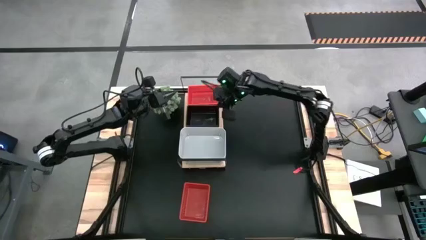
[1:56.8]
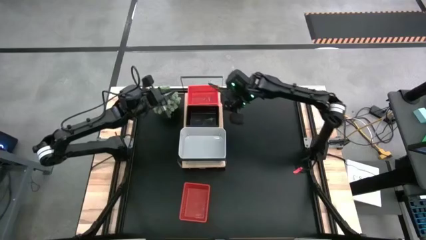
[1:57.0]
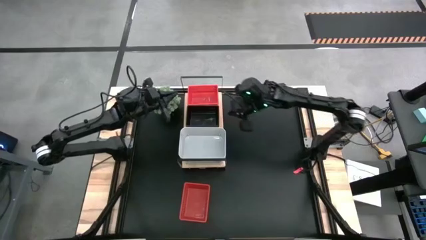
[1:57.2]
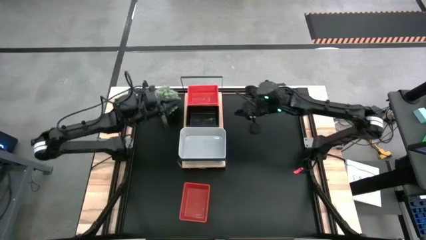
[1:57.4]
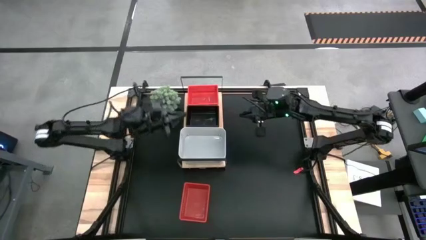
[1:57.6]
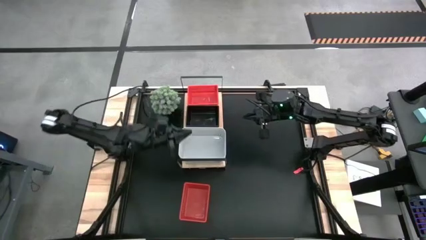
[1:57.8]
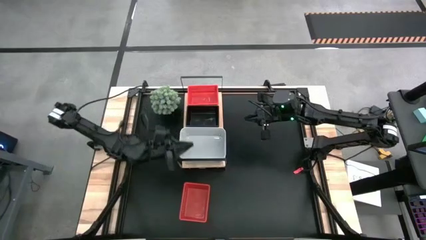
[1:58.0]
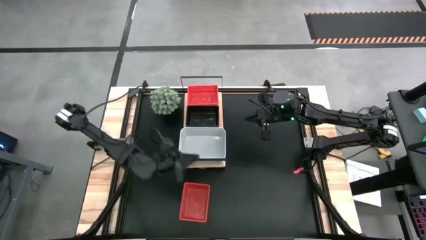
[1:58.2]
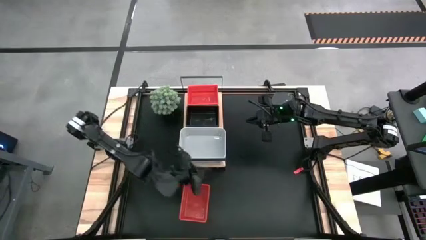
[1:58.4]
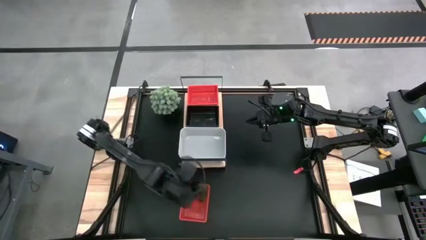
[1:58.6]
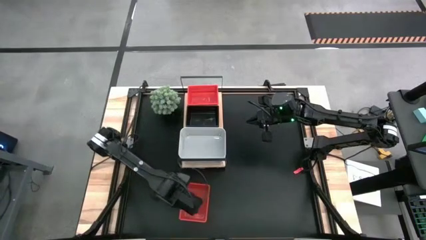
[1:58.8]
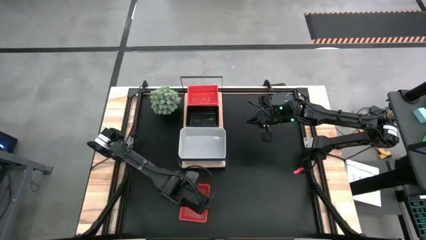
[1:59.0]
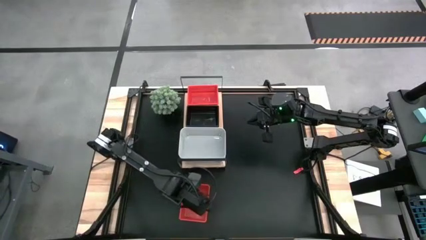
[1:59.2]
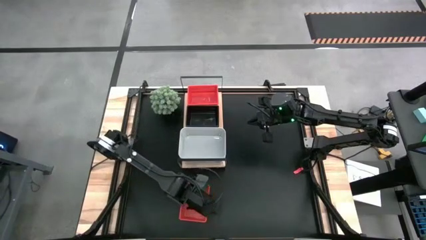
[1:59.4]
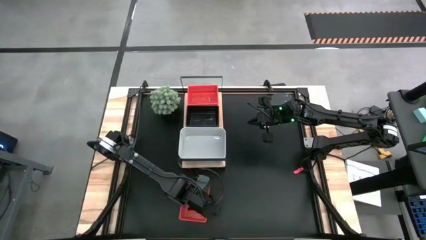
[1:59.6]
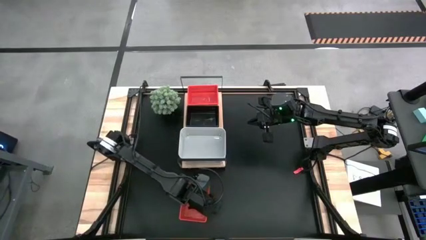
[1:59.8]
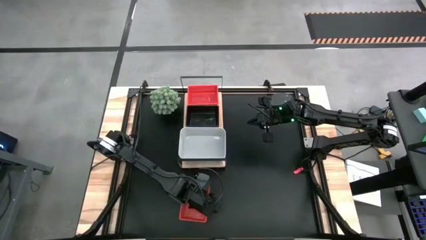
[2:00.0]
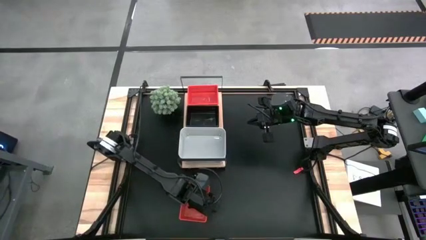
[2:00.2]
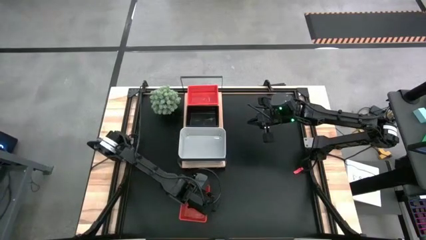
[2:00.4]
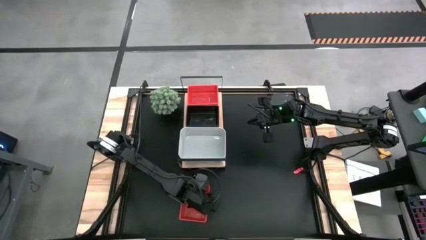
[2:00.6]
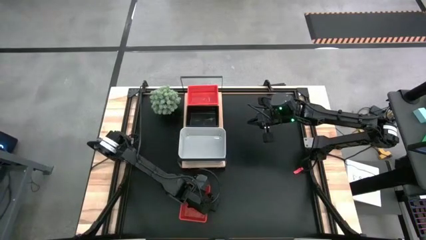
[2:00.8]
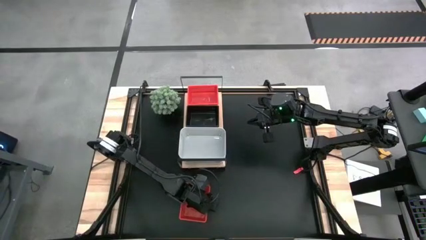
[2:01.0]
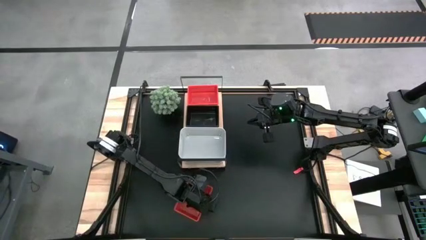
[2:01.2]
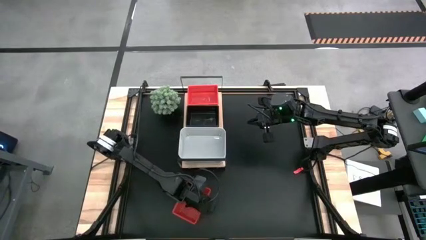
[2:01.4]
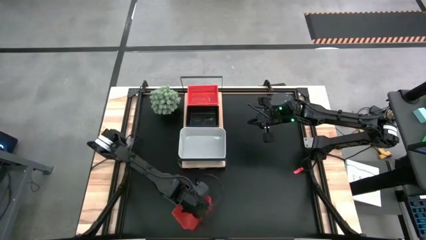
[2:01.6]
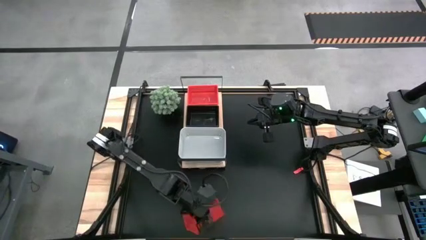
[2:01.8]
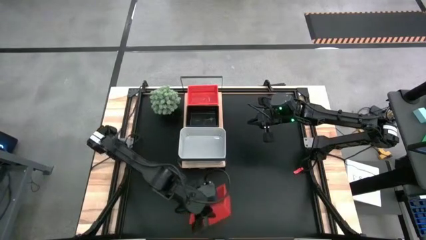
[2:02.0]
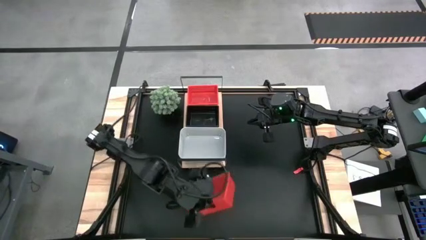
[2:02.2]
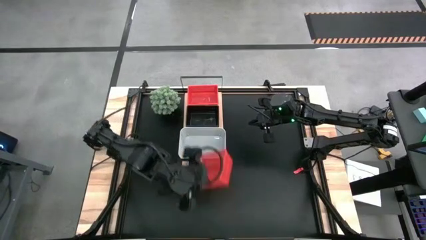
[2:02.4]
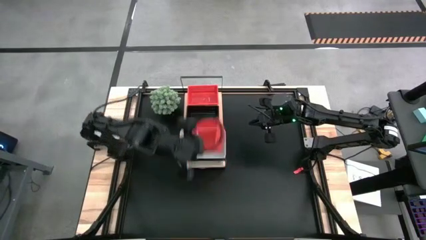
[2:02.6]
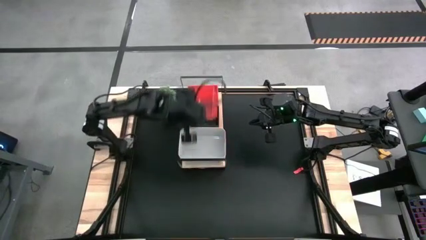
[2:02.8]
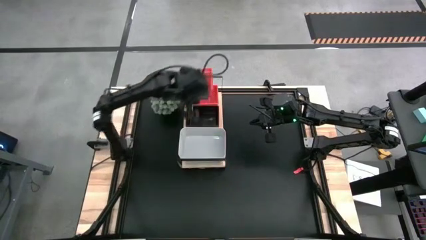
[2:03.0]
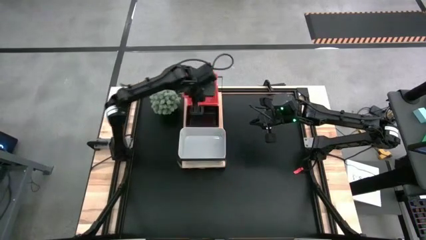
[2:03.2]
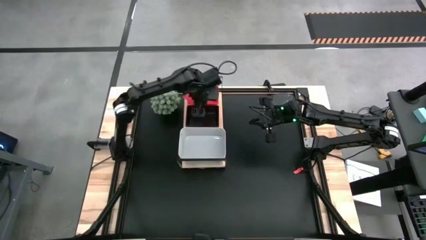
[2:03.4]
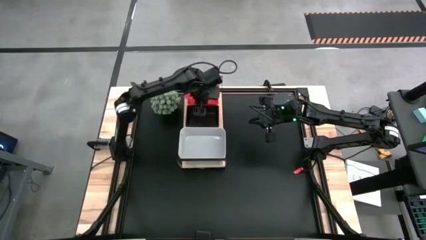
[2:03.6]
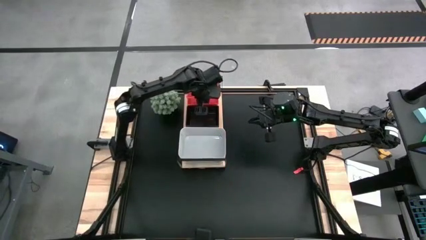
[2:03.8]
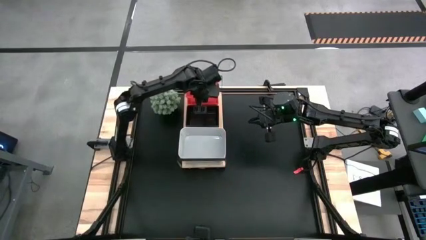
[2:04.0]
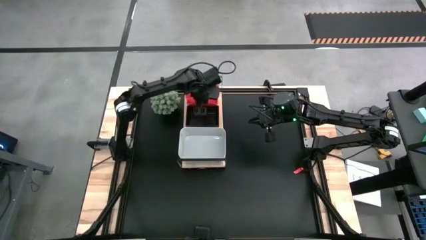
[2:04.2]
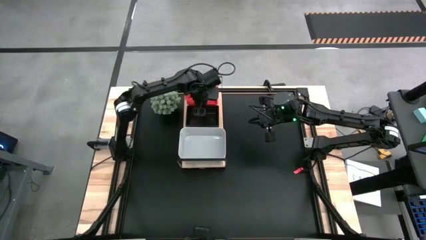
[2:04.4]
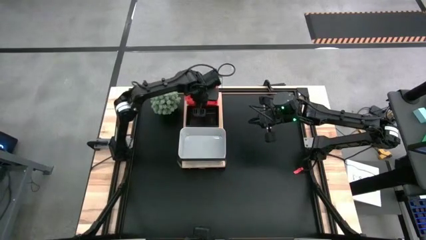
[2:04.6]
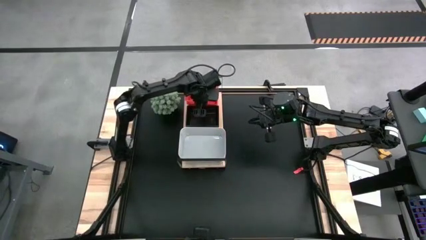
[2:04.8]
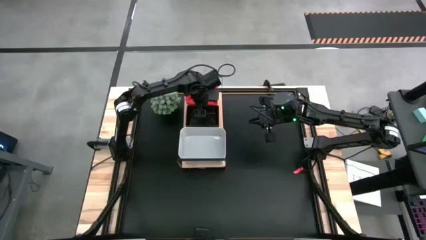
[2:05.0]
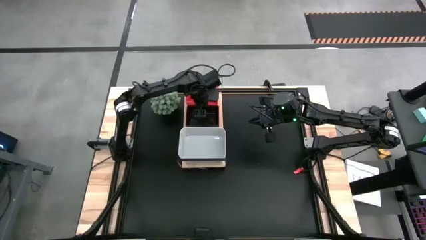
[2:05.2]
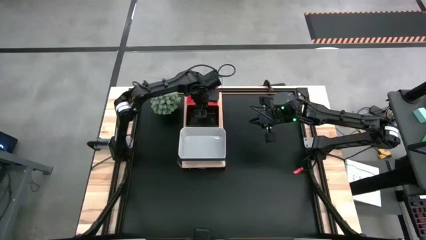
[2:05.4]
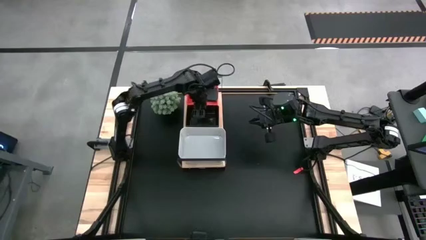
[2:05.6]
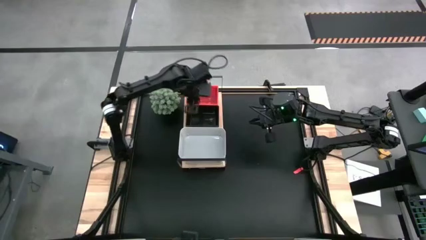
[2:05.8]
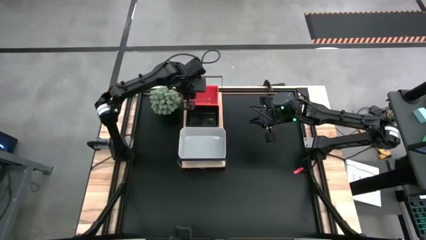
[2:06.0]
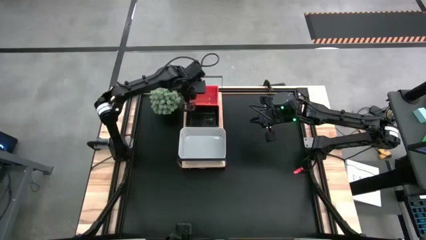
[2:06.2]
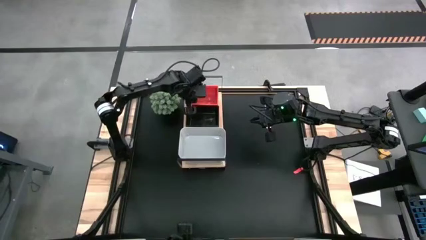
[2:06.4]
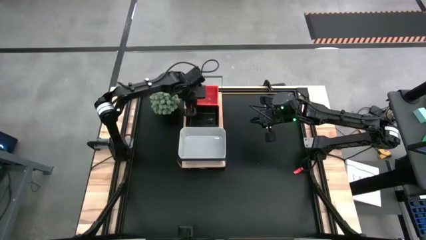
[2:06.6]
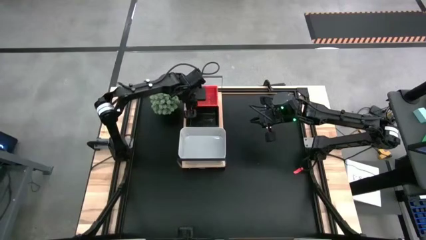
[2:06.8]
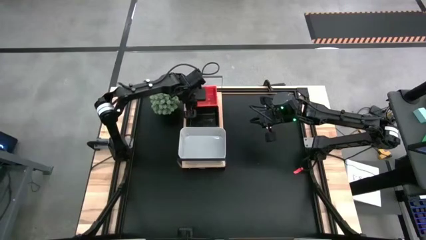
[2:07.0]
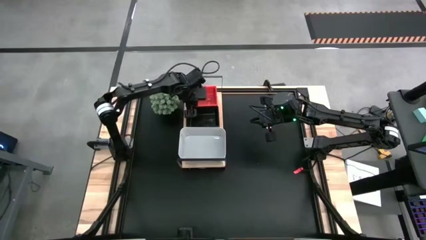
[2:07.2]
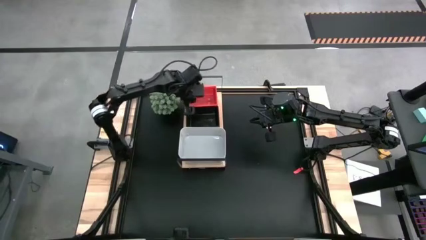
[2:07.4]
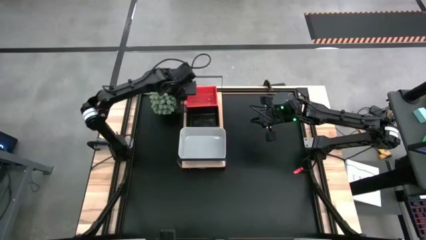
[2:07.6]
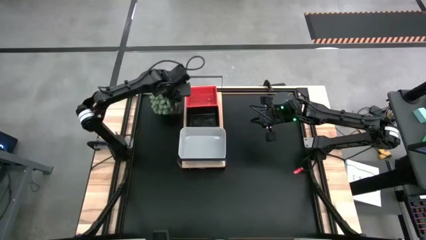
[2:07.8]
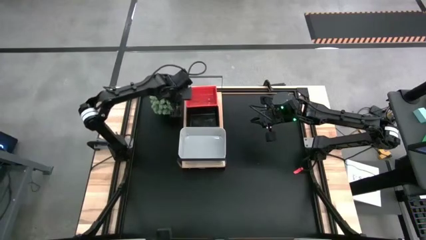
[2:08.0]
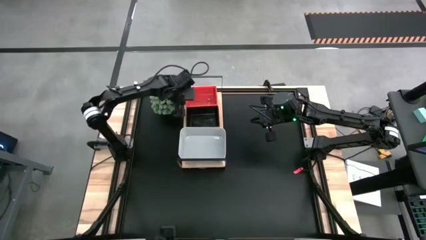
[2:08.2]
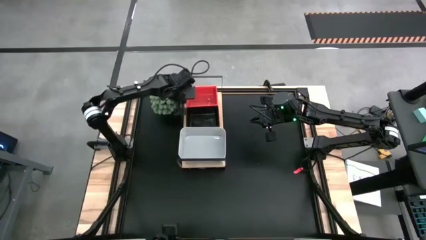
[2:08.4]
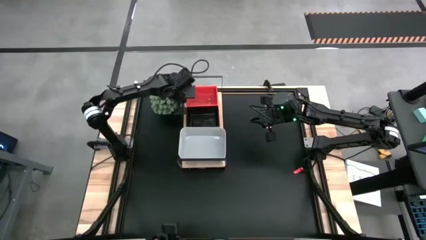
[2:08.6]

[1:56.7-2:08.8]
Task: Stack baskets on shelf by color
Stack the red bin on top of the red bin on the shelf

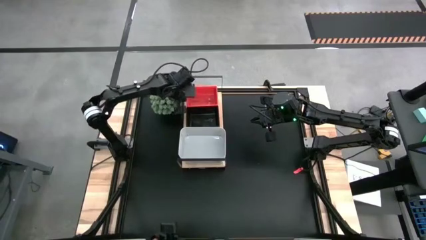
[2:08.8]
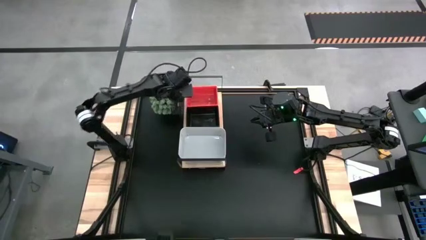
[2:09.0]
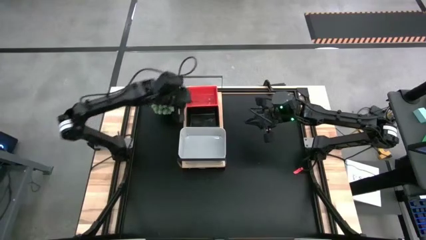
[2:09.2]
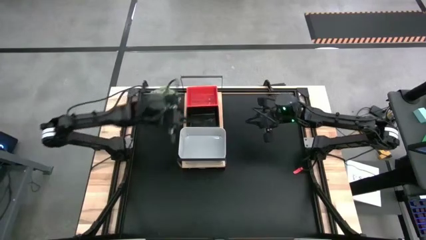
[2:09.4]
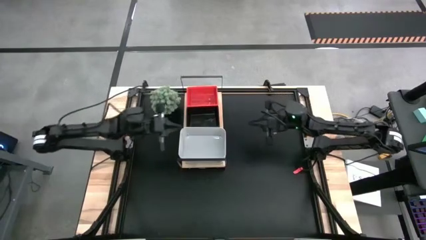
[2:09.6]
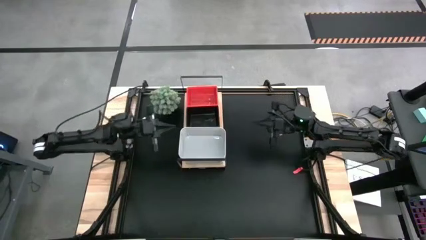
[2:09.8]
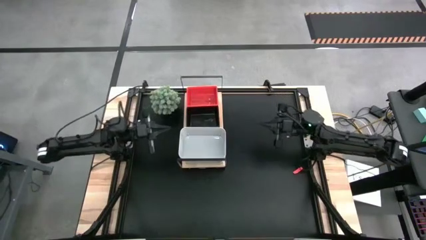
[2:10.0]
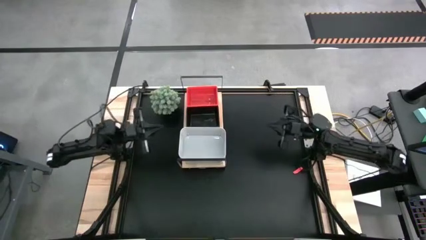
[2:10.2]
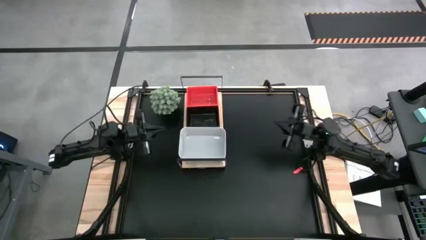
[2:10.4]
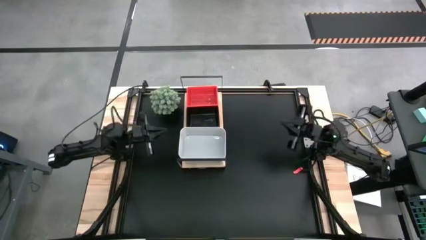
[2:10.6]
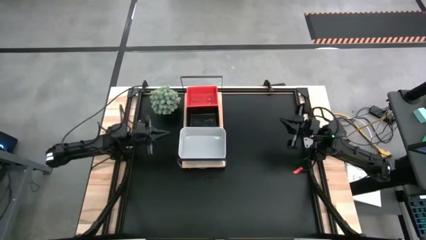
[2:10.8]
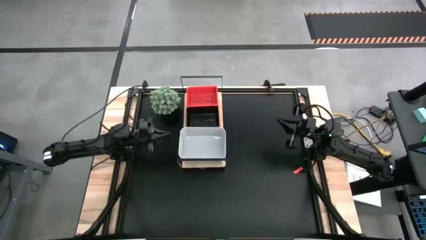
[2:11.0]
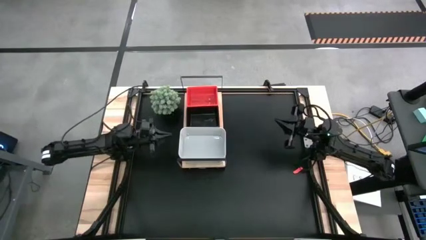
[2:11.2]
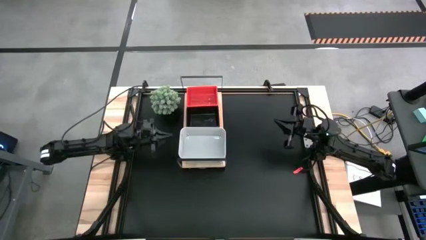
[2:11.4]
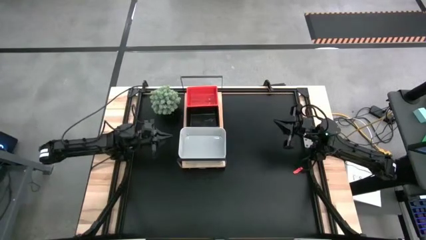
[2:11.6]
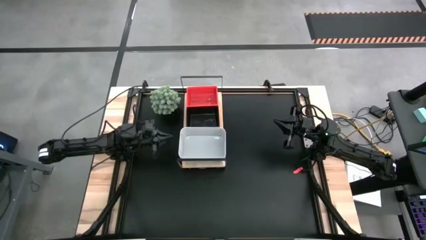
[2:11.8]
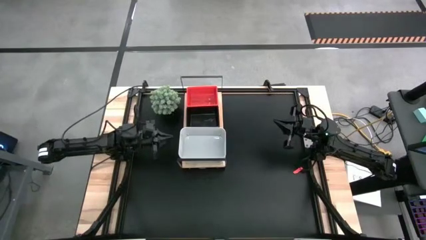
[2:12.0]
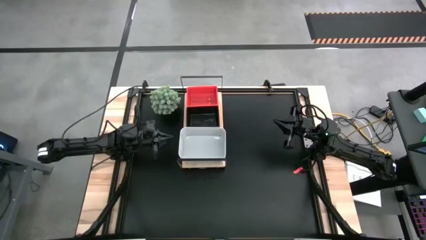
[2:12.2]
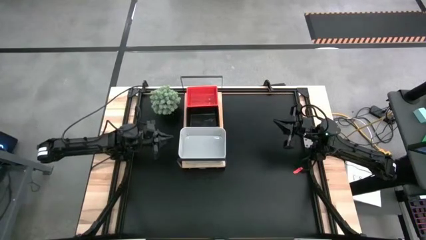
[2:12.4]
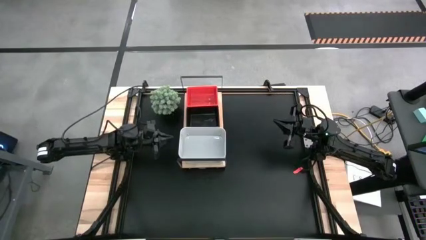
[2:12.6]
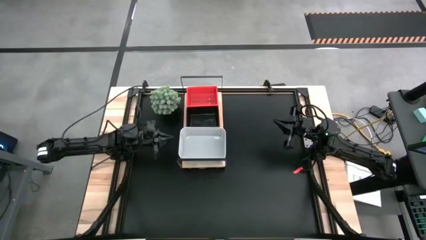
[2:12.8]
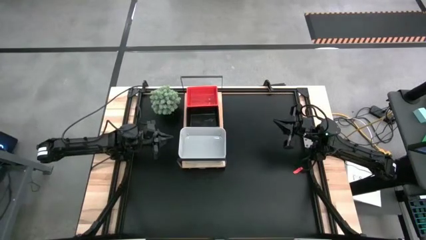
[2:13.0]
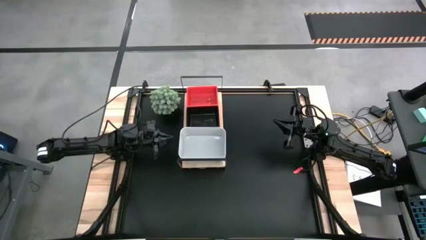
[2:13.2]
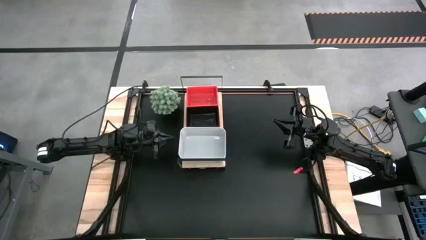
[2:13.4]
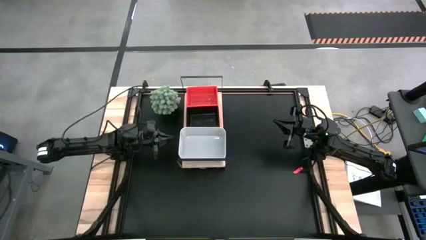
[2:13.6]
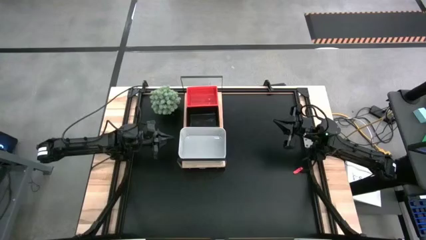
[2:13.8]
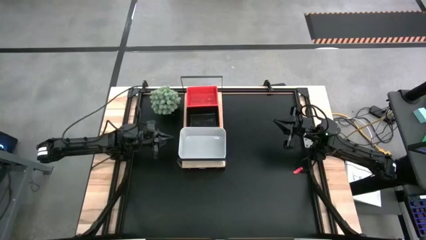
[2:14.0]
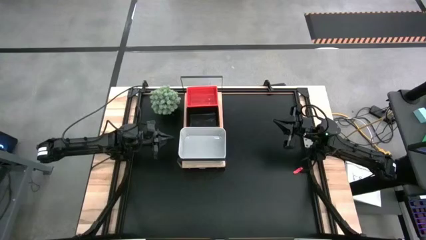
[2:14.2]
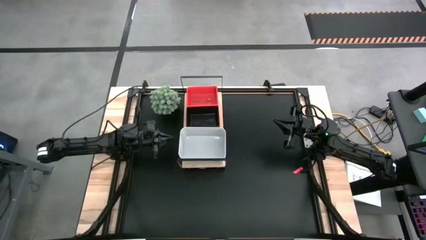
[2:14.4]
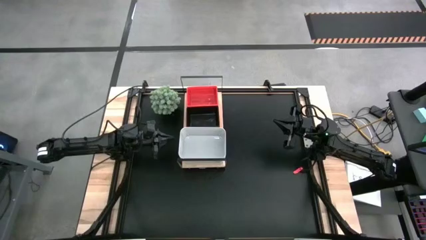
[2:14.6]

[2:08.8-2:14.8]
Return to Home Position
